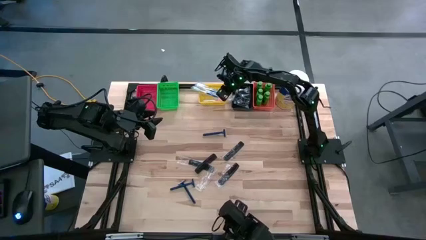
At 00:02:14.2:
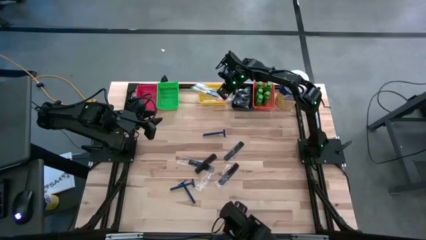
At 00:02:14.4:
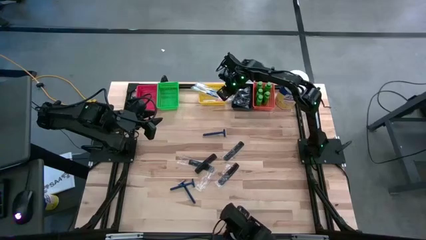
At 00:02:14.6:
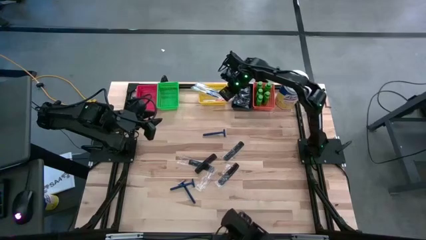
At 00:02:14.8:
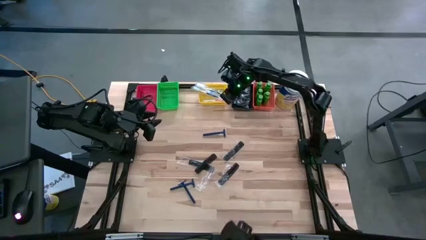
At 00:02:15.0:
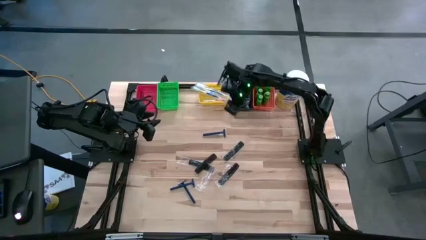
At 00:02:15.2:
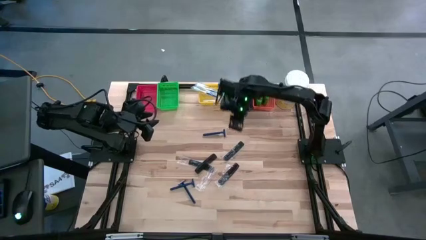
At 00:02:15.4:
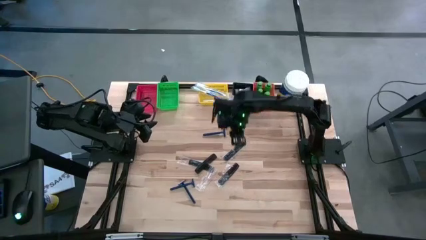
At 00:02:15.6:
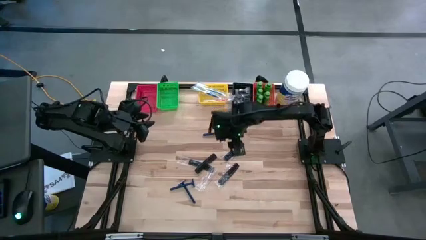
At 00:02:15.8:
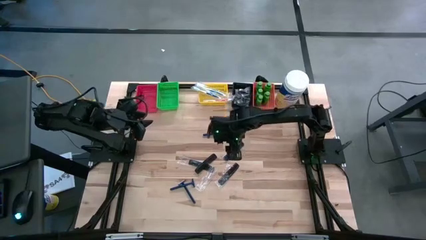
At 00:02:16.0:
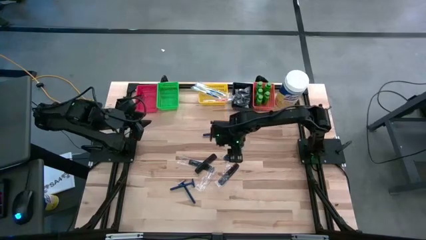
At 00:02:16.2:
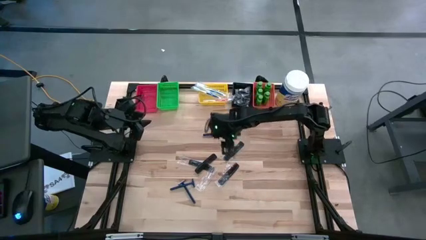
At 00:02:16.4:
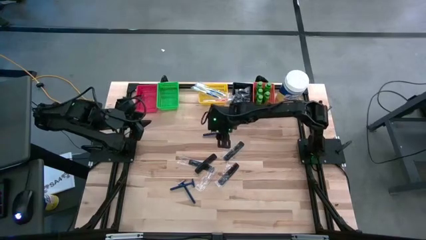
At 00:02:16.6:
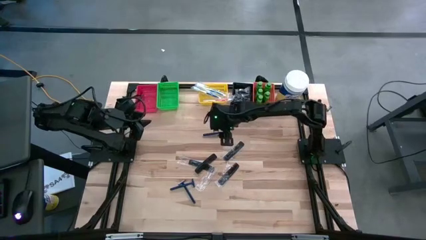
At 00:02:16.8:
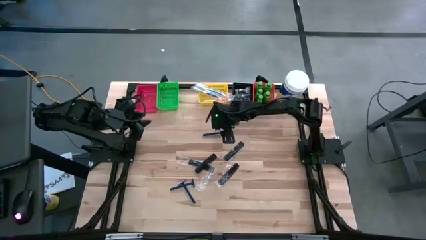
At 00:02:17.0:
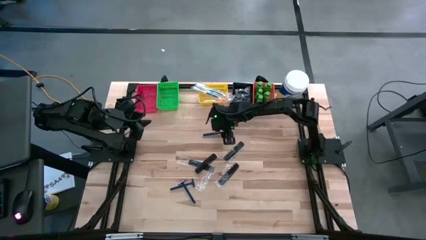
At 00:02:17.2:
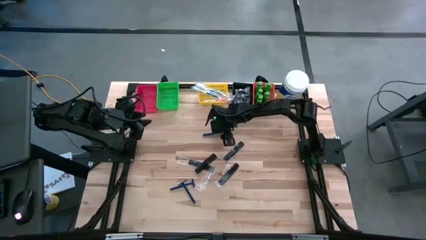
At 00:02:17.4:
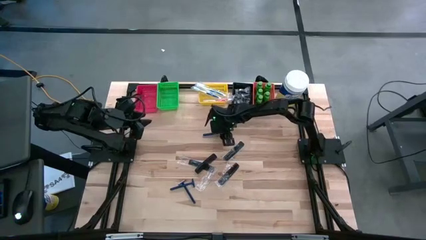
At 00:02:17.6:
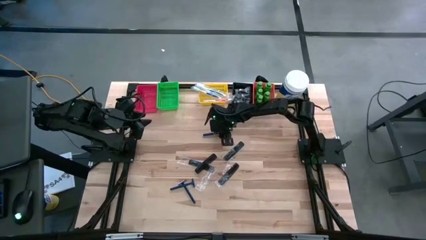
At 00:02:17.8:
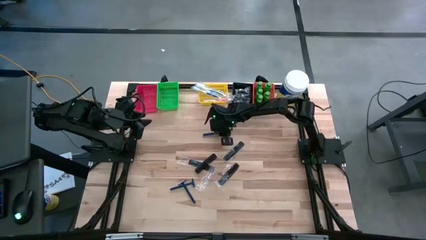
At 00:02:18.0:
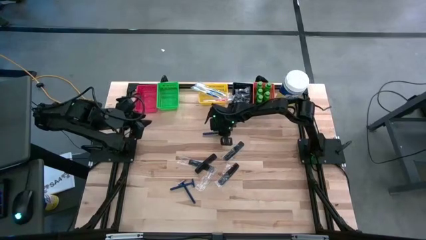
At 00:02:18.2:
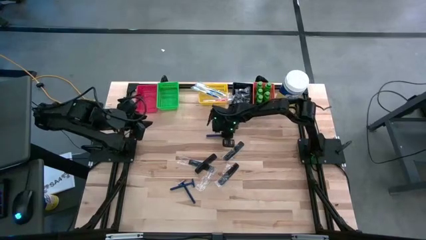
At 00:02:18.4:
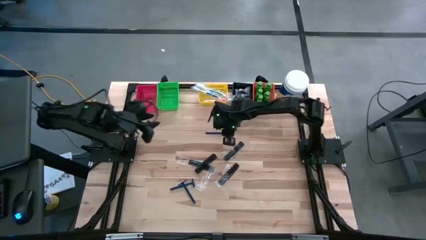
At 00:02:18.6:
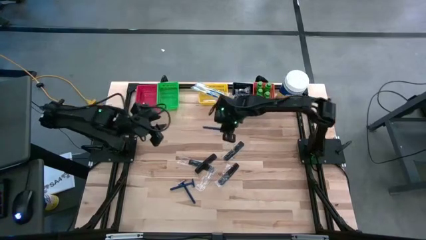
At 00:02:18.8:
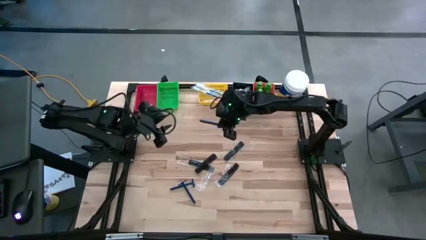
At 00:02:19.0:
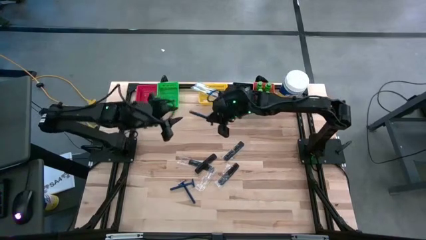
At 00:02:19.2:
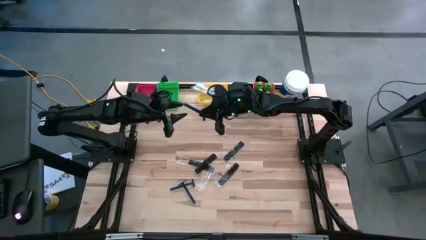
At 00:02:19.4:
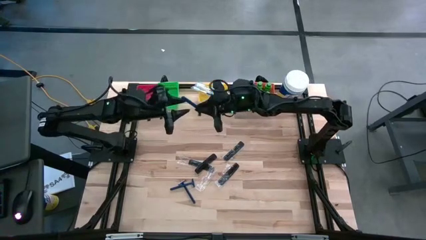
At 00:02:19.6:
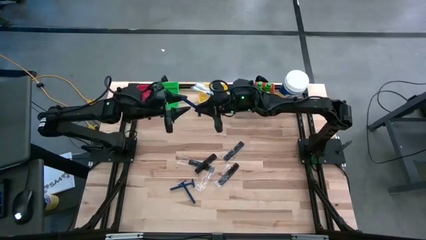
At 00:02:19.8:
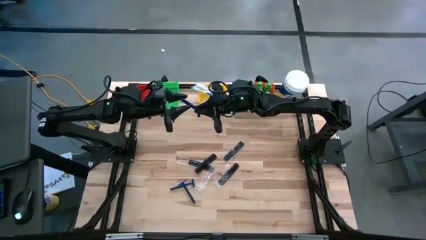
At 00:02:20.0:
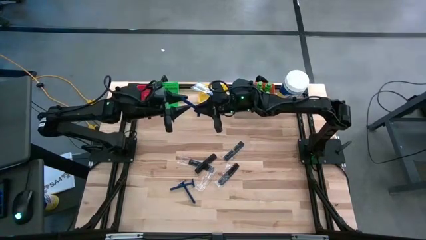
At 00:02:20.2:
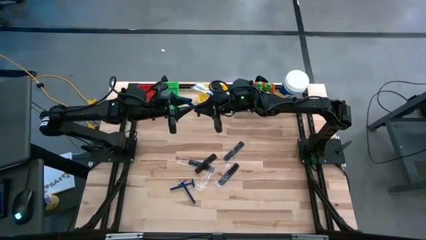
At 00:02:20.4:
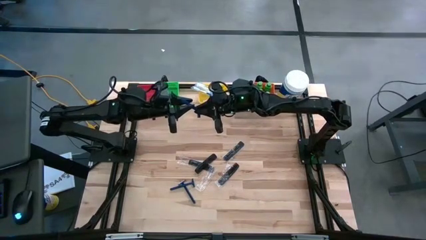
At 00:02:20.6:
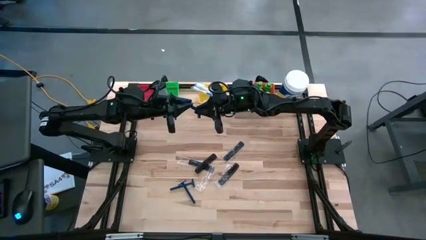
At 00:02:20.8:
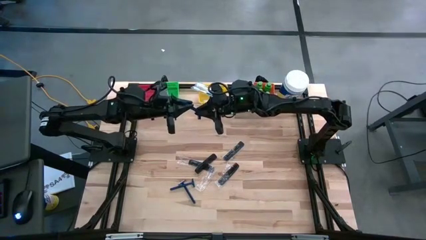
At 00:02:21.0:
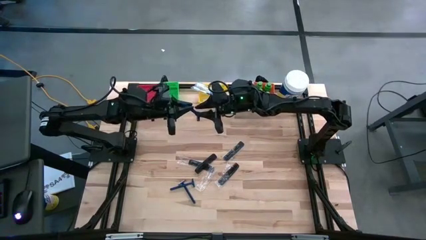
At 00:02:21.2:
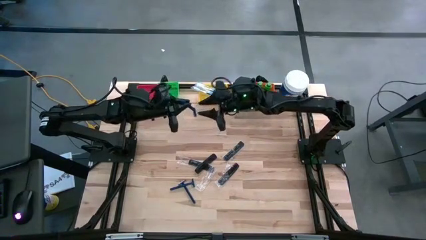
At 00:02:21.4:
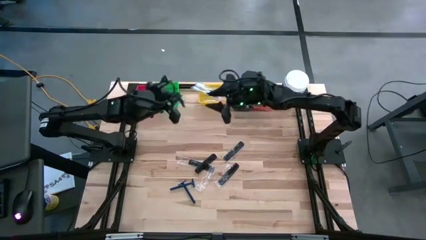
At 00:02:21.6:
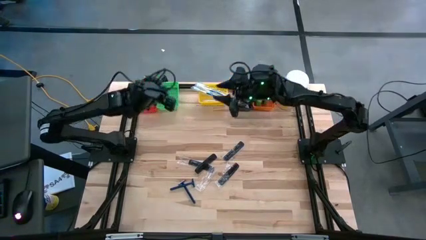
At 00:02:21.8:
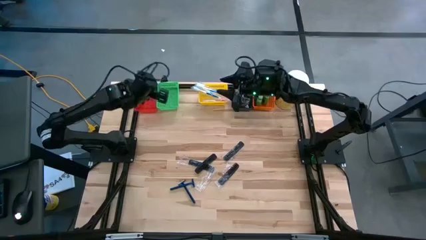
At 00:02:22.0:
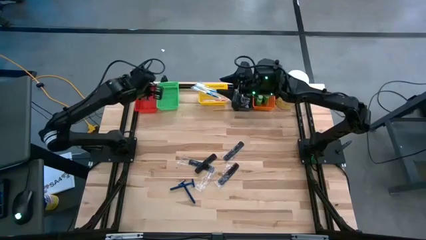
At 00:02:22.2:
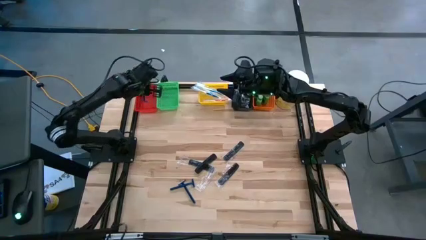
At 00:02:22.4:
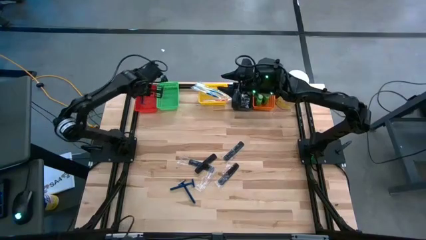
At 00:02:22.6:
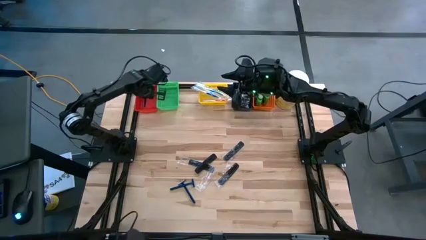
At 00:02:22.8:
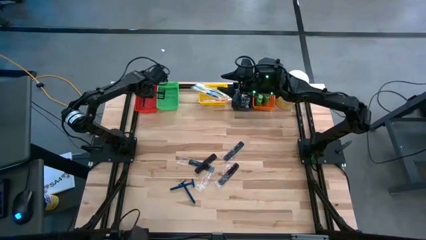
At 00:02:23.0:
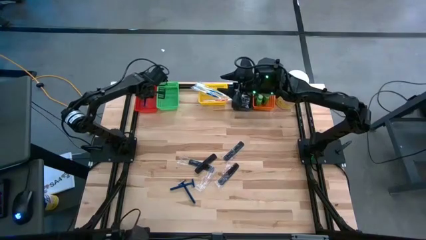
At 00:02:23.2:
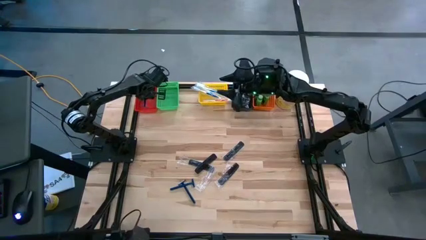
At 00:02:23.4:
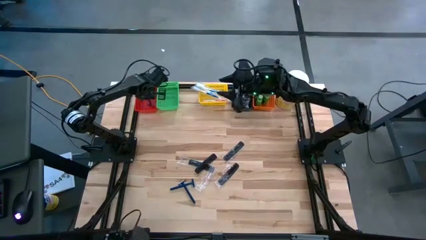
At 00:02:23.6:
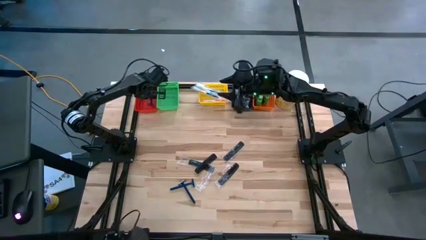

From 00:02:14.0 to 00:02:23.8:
Task: Pick & Place Travel size toiletries
Put the blue razor into the red bin

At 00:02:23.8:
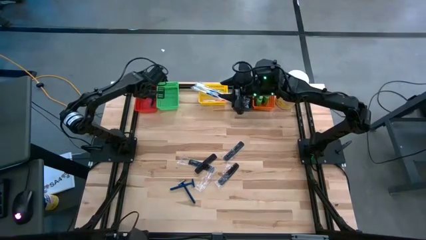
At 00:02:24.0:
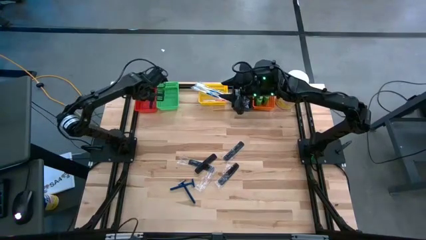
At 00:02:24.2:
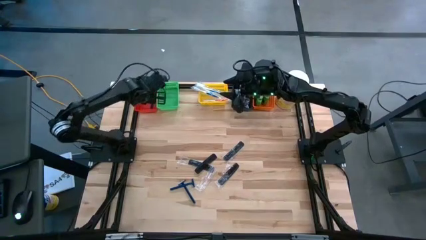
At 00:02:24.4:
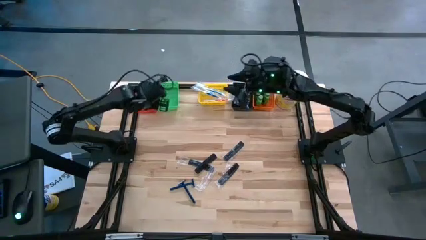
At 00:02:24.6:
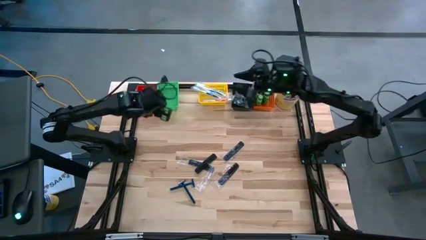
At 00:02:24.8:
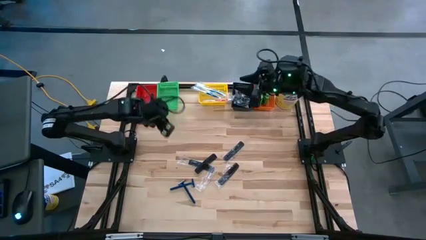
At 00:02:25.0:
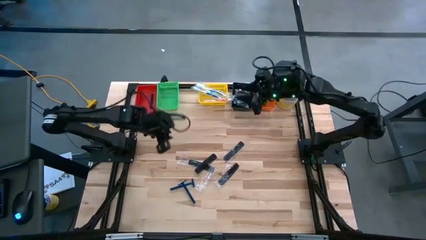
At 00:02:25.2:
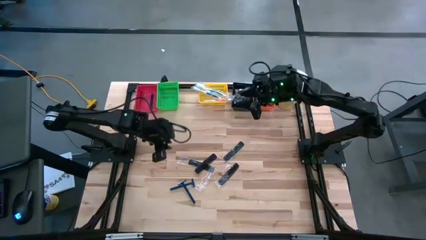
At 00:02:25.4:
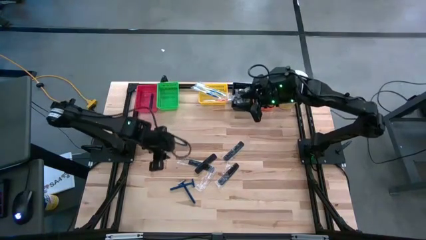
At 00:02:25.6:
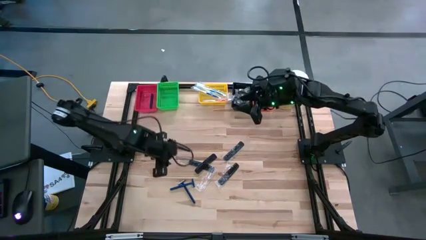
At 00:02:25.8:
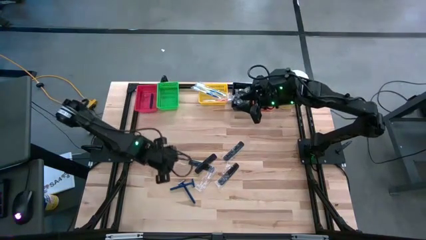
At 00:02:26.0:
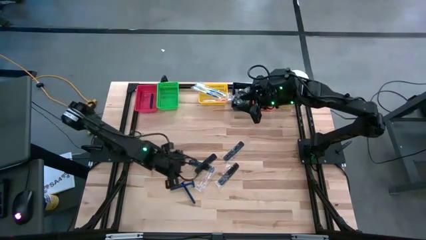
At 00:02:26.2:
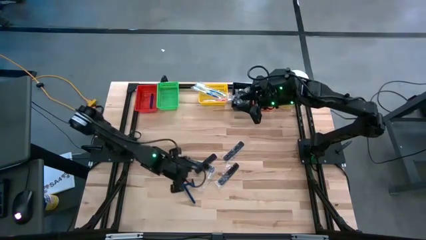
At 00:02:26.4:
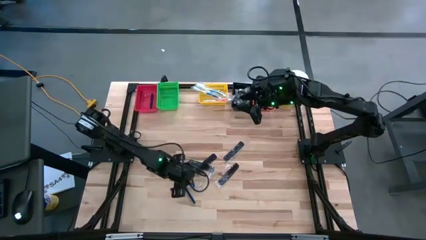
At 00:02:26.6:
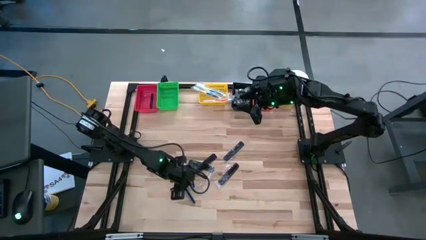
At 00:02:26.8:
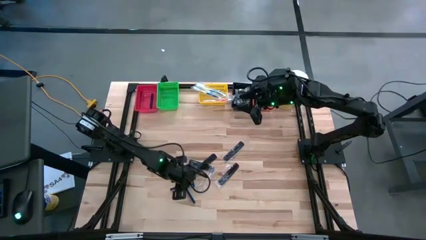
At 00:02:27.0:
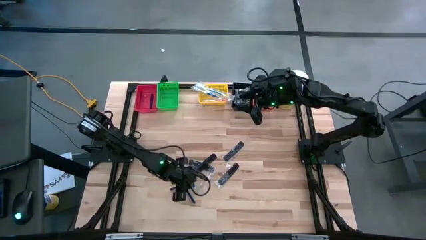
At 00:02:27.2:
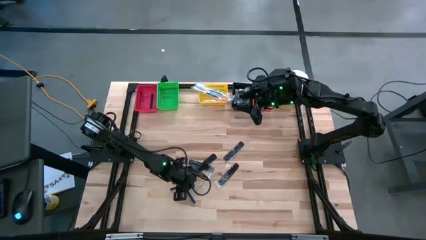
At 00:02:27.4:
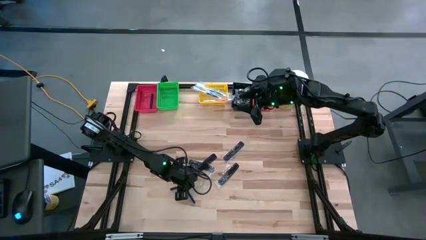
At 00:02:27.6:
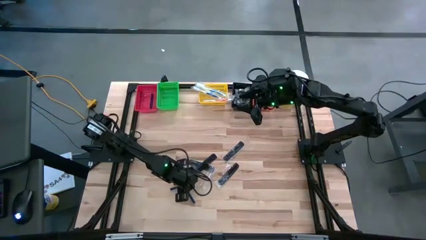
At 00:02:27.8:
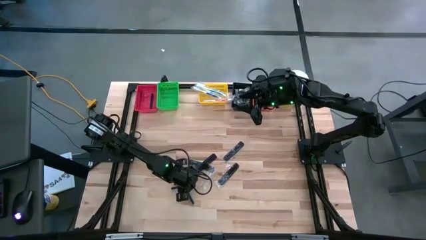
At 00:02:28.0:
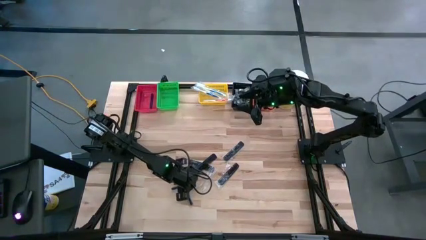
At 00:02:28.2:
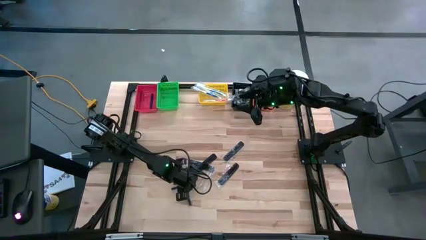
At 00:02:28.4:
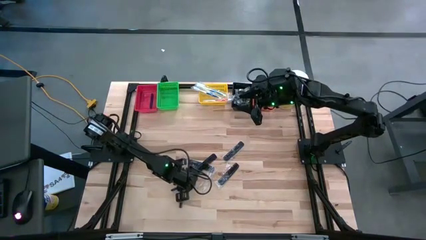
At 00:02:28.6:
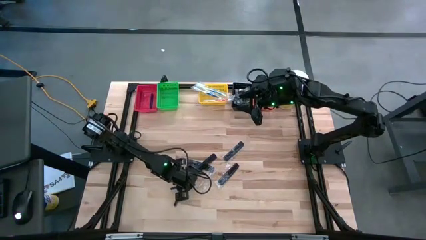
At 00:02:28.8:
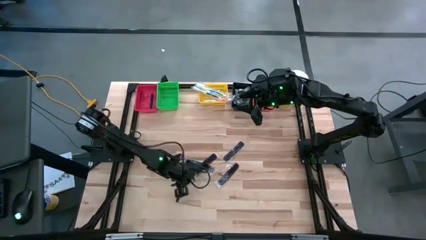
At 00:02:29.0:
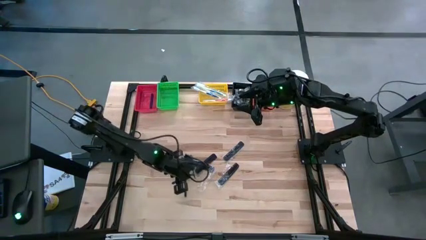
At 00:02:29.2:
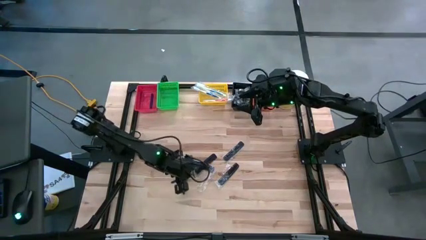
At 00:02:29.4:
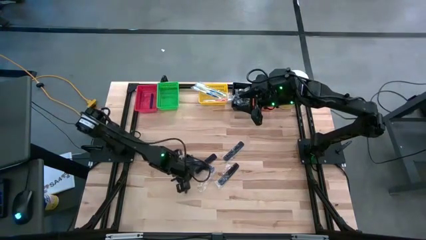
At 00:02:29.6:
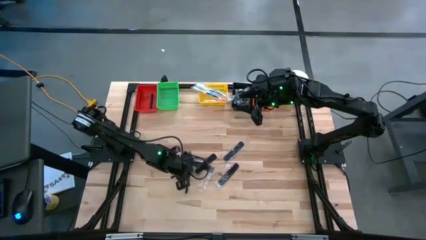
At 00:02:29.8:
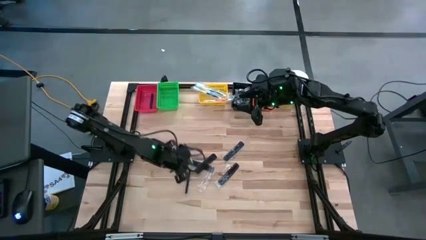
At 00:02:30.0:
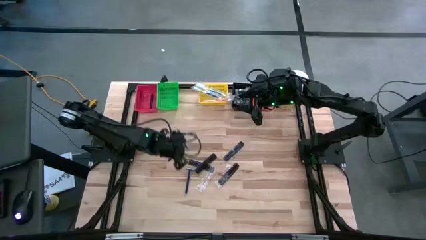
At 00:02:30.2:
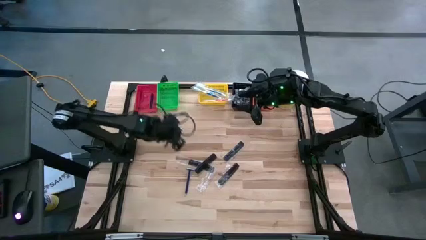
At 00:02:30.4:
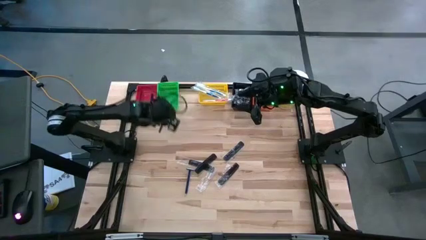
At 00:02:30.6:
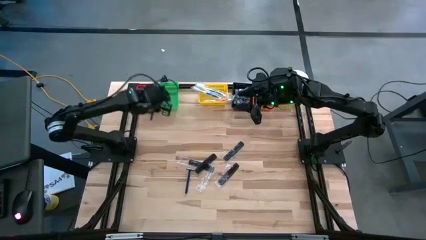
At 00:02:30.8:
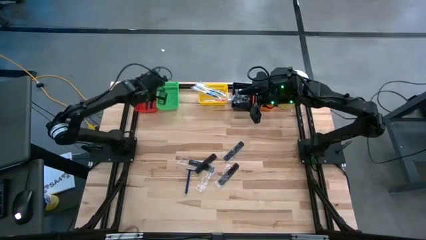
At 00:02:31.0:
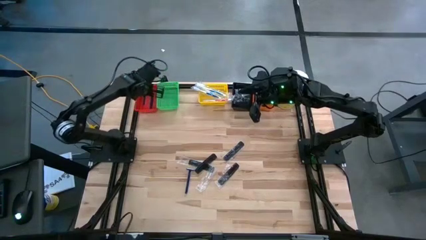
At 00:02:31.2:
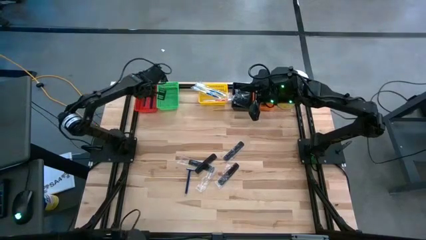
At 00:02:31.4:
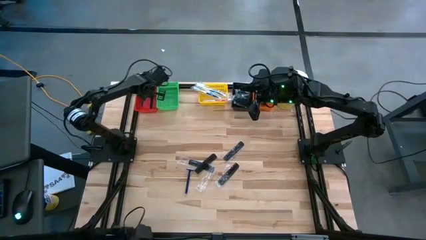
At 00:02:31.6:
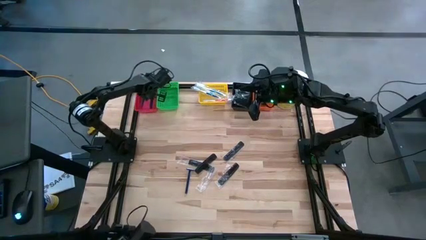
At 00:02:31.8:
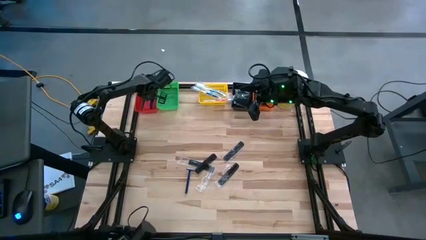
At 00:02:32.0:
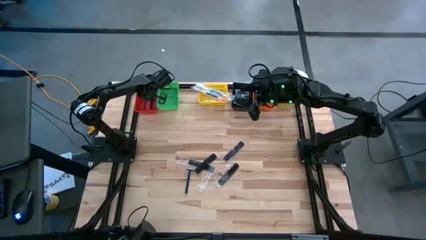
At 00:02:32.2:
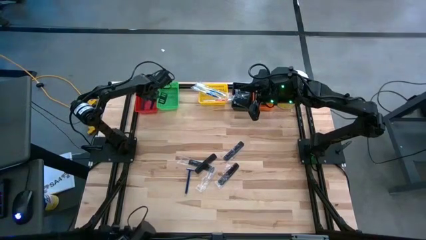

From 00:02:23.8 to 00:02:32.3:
Put the blue razor into the red bin
